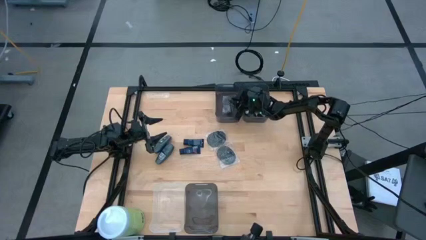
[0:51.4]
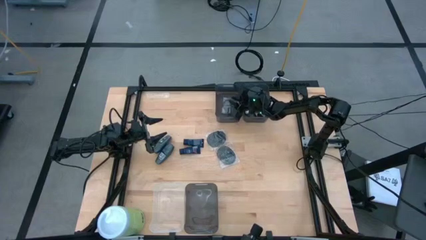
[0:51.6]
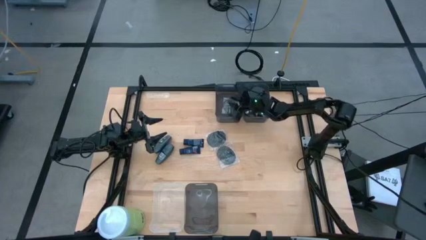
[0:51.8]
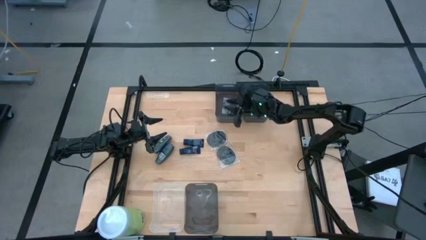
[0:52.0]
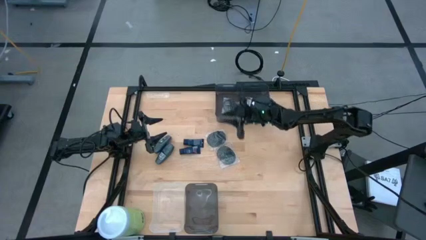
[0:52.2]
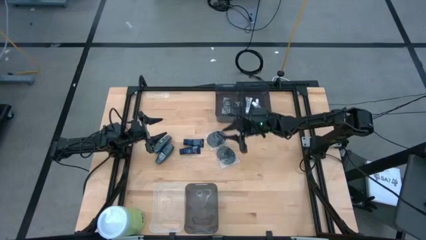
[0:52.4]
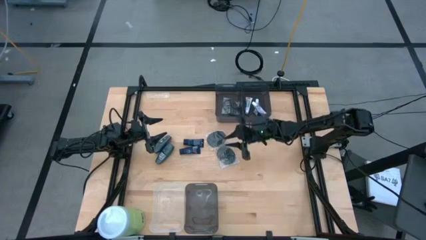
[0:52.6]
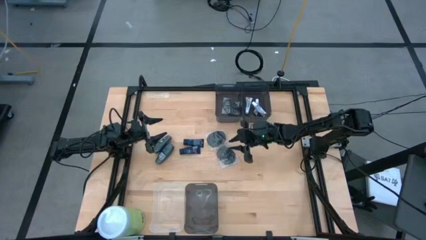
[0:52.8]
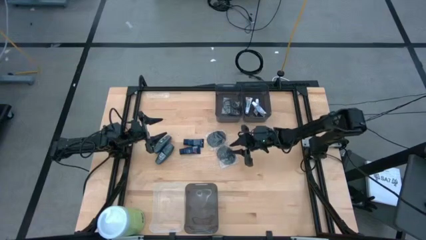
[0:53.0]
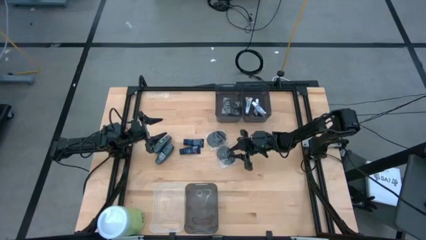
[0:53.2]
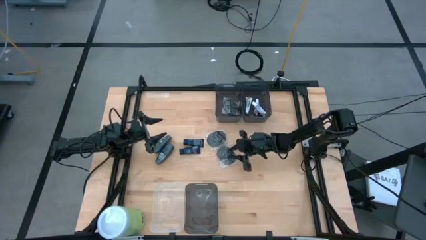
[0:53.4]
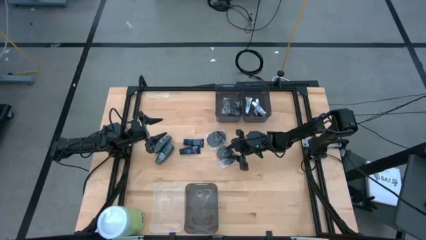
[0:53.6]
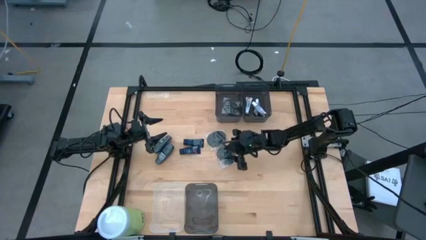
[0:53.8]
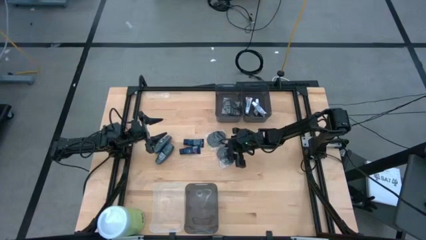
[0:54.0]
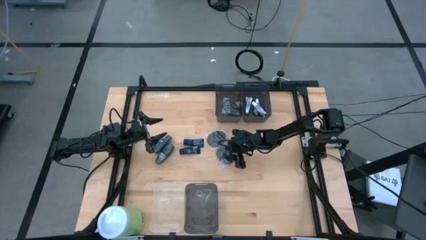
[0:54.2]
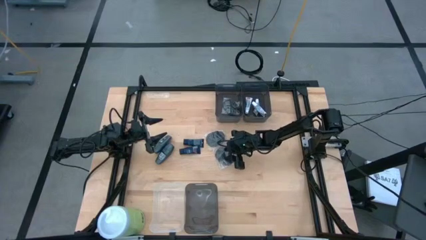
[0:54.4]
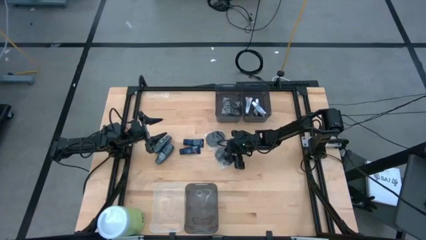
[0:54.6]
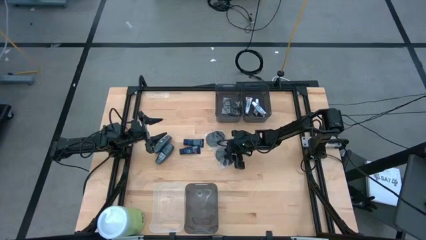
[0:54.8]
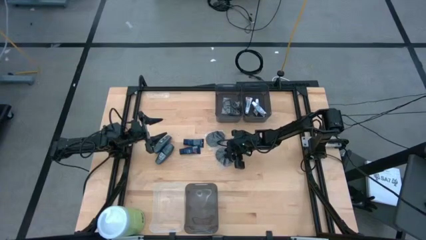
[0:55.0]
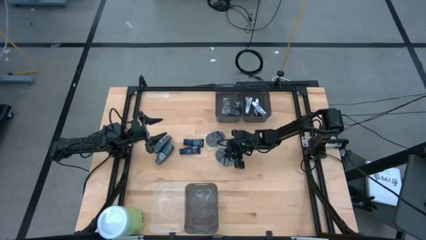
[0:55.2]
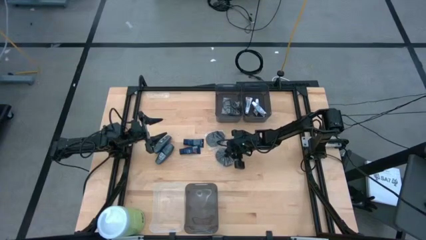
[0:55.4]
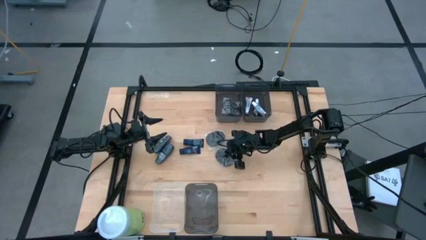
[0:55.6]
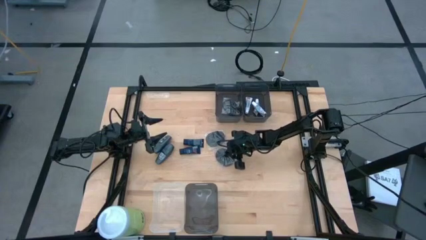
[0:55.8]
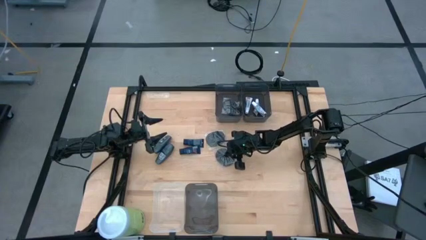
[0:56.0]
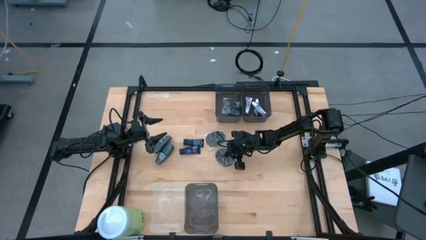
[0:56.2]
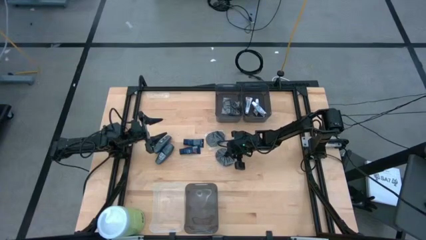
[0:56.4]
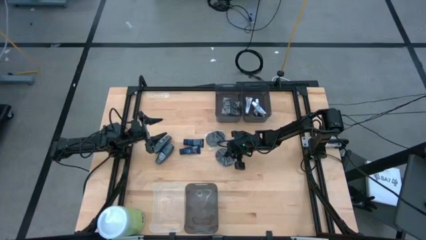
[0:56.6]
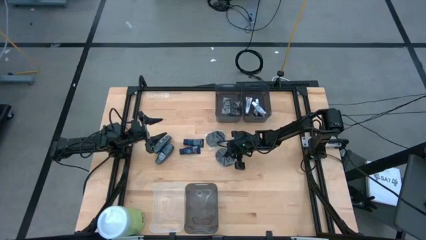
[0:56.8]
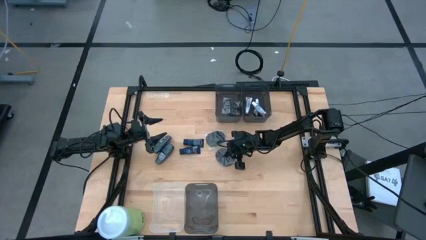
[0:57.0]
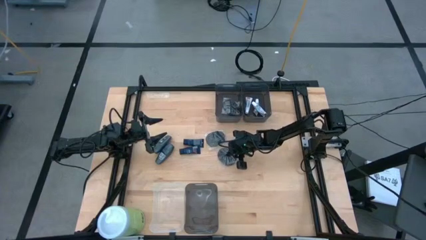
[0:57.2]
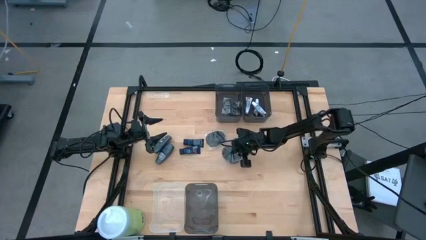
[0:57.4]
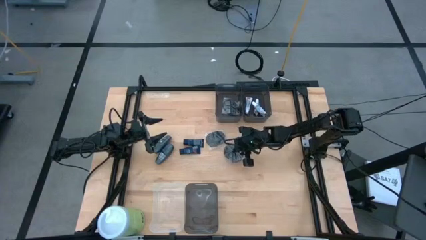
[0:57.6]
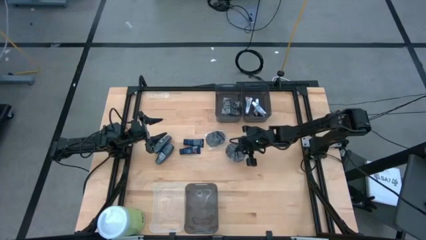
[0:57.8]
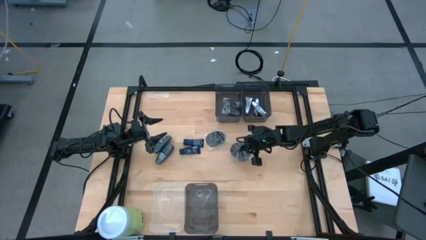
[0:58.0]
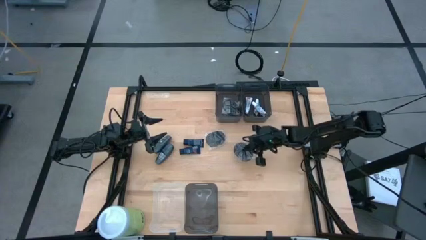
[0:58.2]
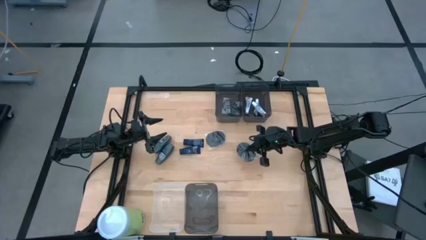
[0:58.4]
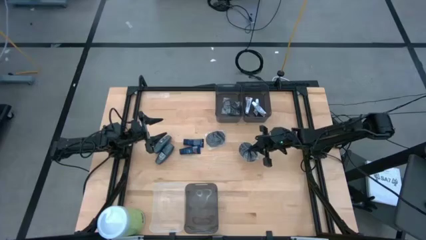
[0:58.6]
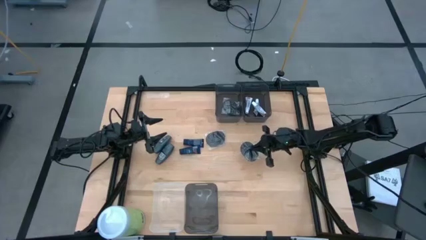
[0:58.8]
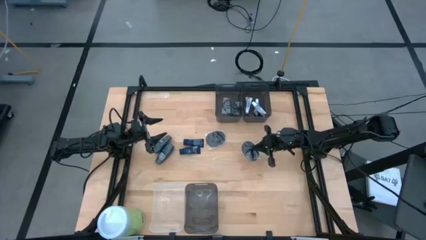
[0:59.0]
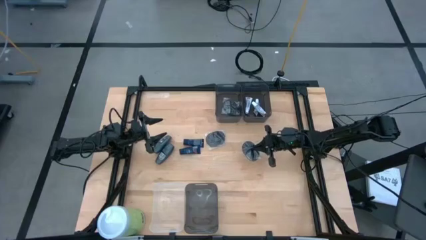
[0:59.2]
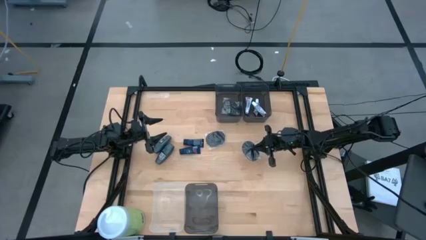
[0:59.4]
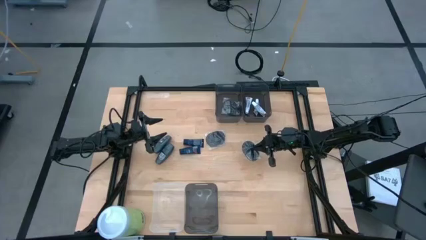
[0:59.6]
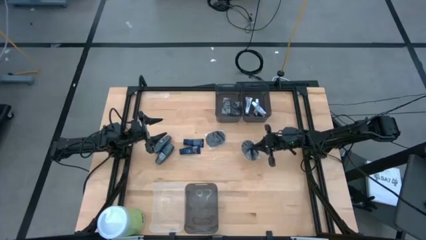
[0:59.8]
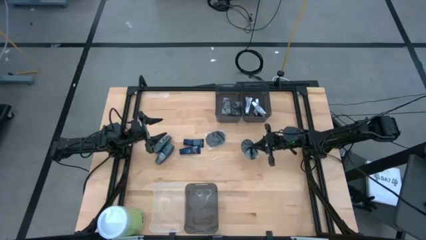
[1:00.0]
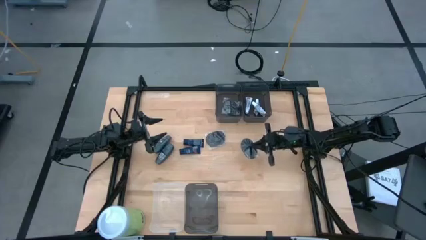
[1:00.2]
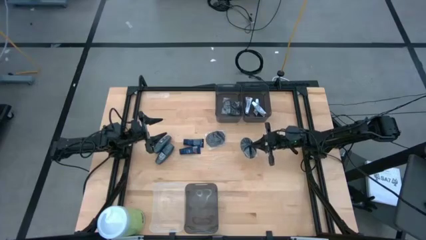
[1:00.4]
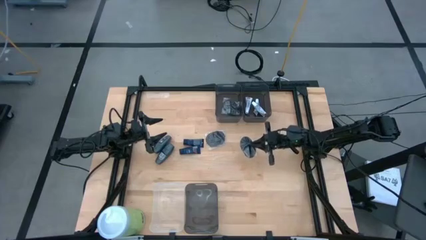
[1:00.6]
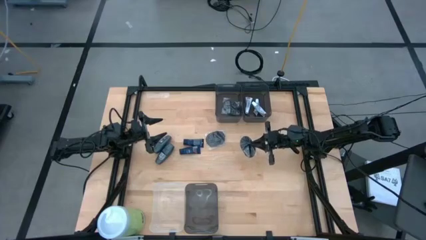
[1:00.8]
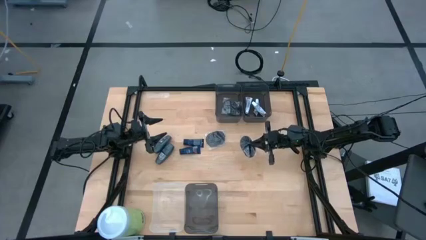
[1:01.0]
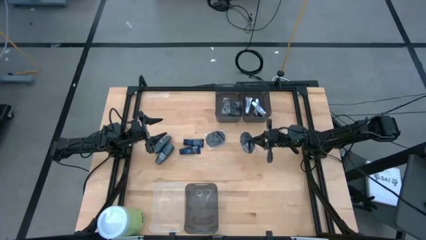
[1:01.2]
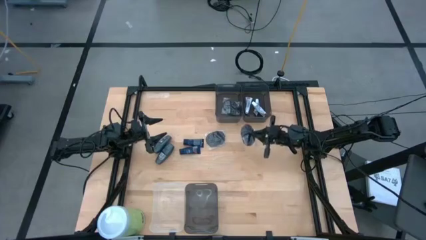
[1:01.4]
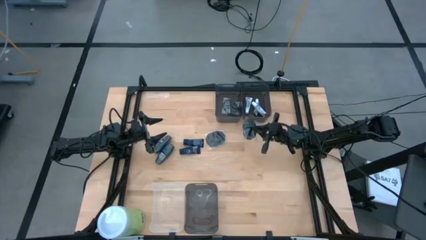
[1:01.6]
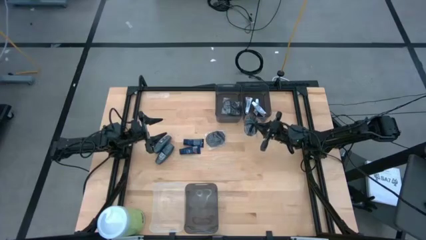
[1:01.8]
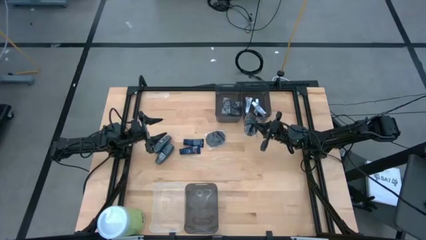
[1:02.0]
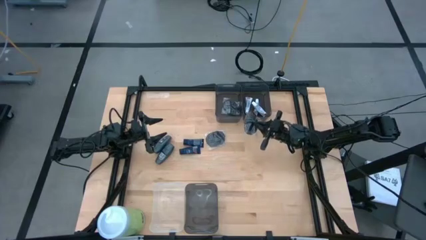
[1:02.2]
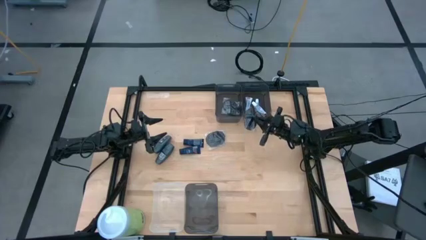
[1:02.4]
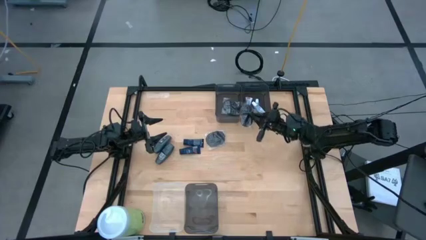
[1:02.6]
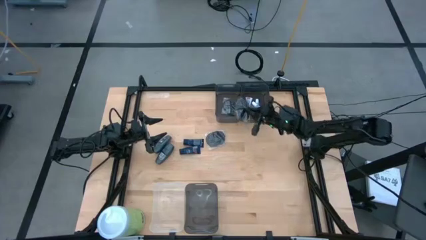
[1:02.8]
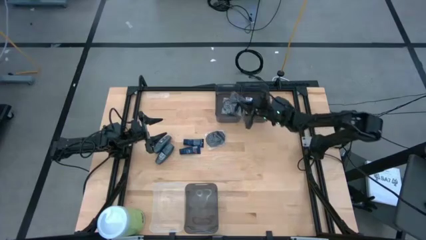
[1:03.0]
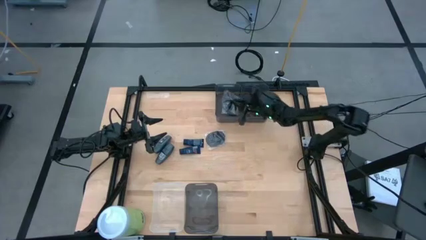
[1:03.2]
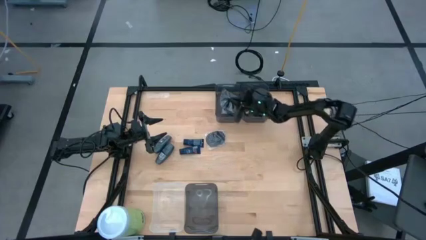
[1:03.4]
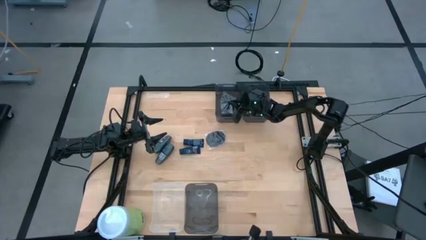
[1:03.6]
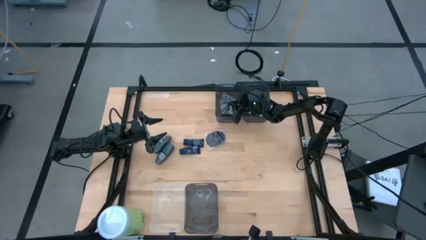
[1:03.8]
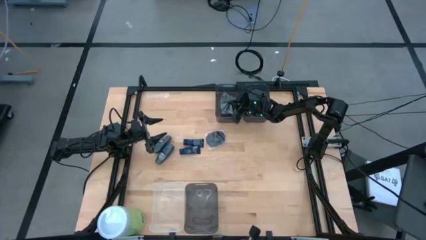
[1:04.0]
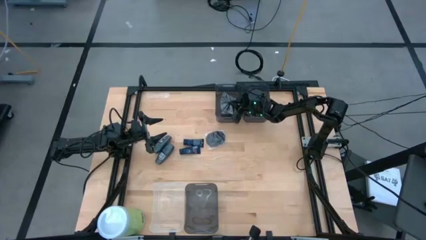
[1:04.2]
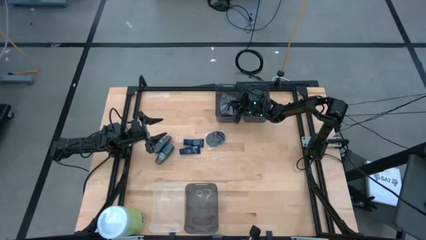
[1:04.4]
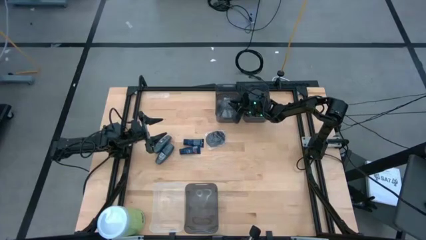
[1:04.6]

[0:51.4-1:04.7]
Task: Pick & Place Travel size toiletries
Put the bottom black hairbrush into the top left black bin

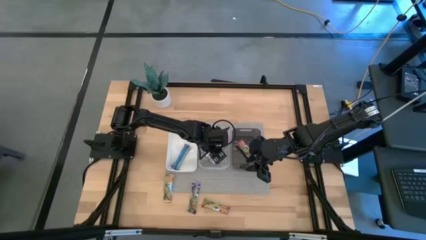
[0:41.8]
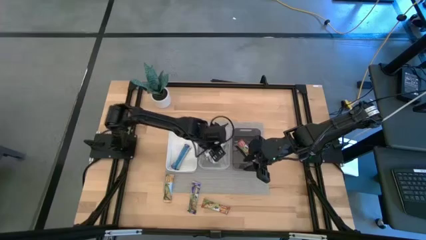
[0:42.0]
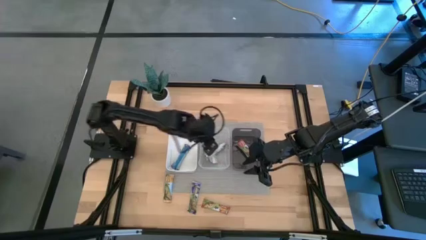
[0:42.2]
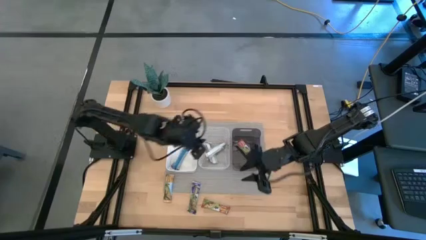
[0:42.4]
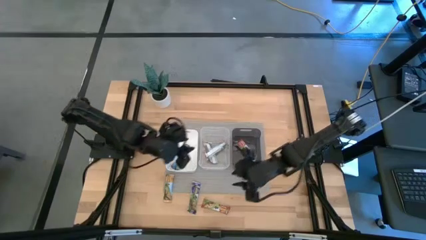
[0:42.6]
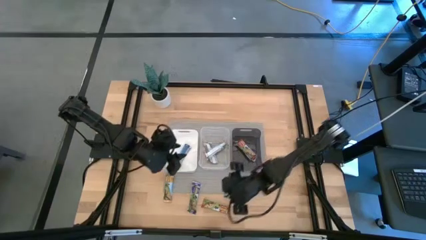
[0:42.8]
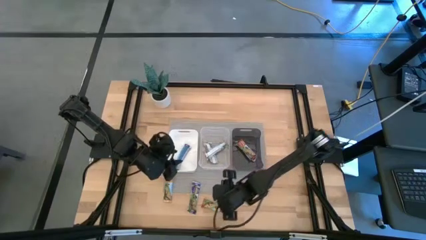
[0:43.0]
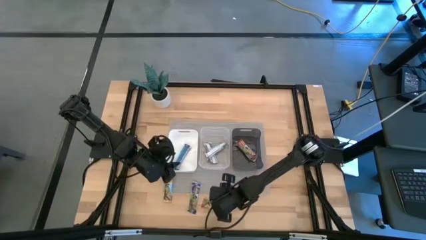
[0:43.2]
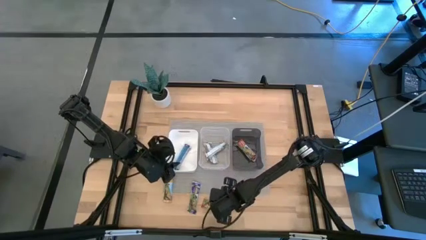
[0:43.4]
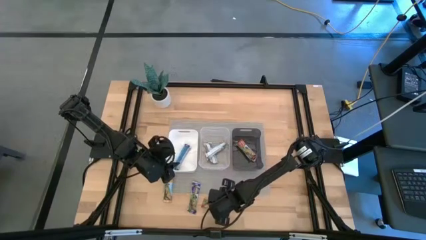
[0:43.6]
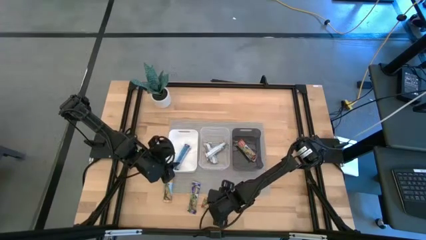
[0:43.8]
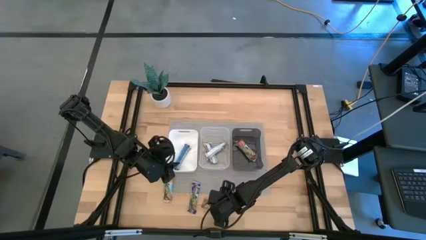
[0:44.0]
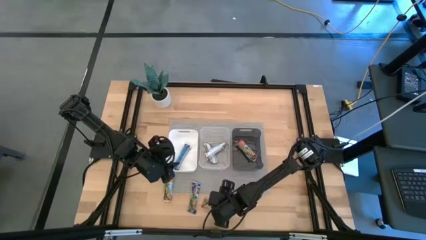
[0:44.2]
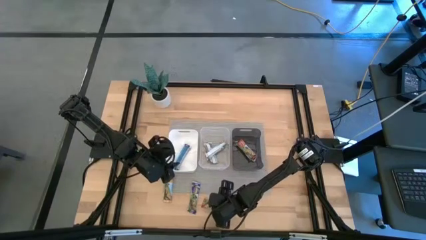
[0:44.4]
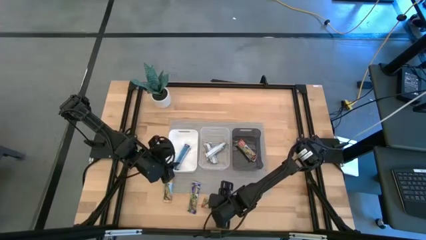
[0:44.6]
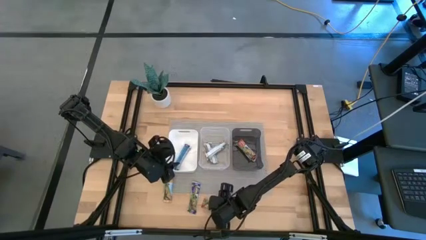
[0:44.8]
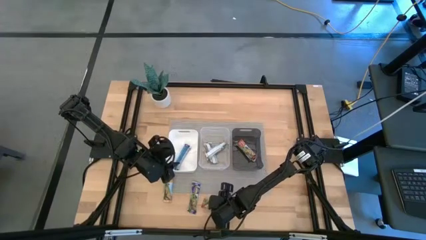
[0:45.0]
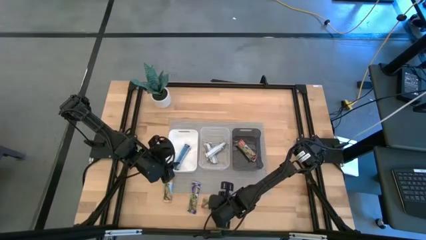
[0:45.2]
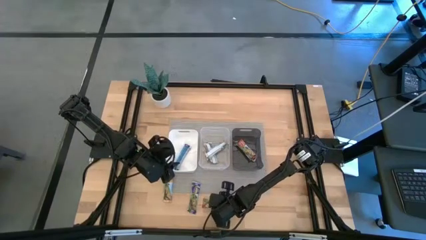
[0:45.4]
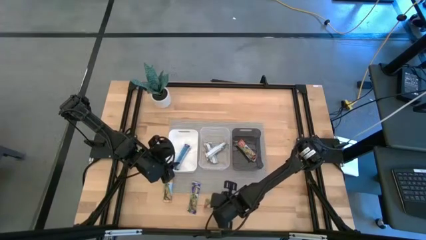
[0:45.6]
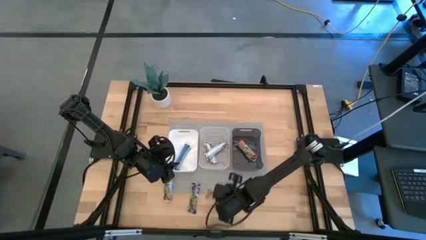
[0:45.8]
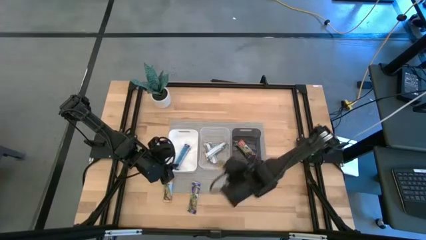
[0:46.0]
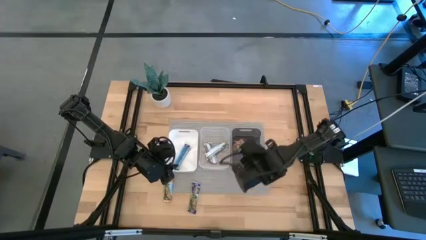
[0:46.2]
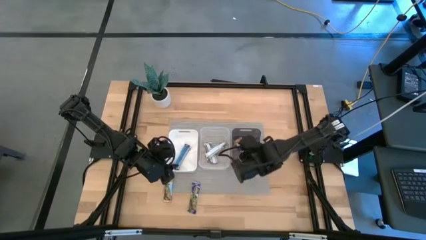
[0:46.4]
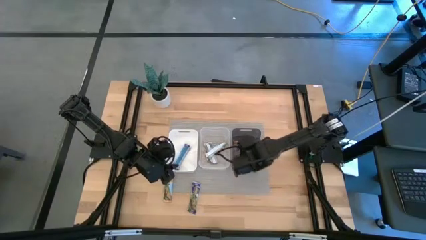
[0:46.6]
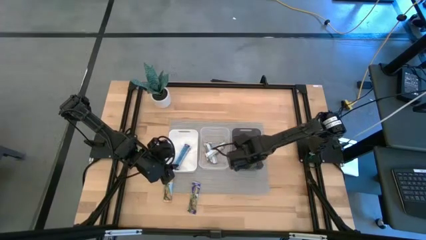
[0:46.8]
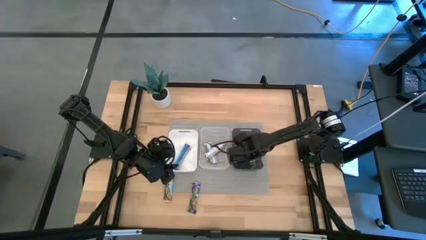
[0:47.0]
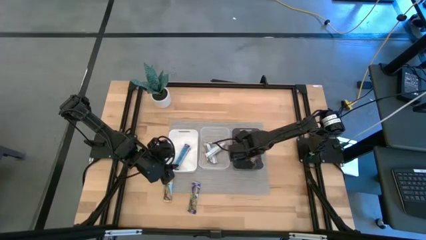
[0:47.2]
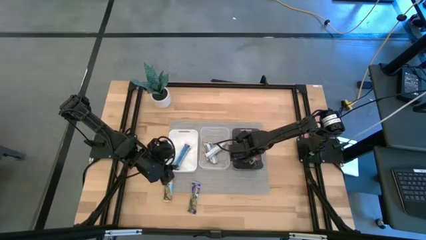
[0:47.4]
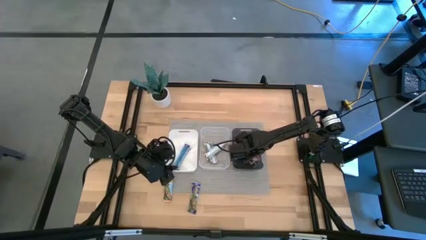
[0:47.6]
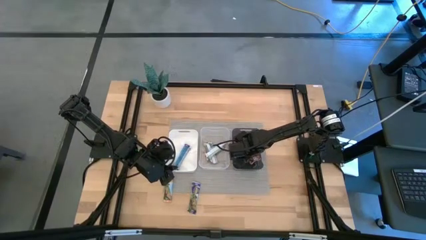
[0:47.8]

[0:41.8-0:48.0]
Task: Pick and place Granola Bars by type
Put the red granola bar into the black bin
